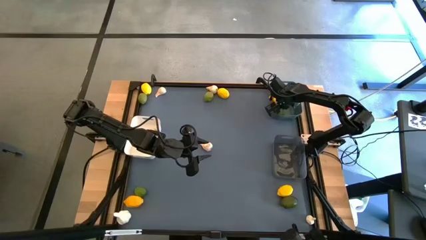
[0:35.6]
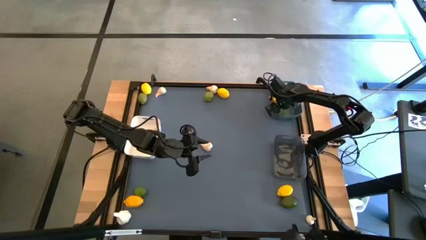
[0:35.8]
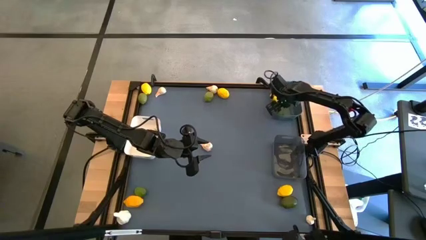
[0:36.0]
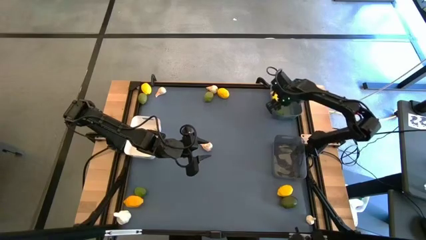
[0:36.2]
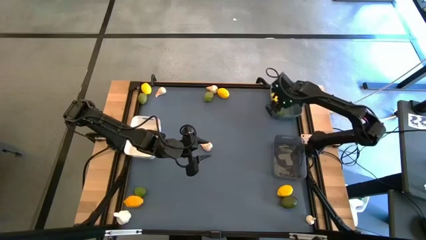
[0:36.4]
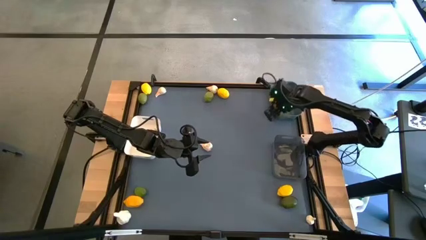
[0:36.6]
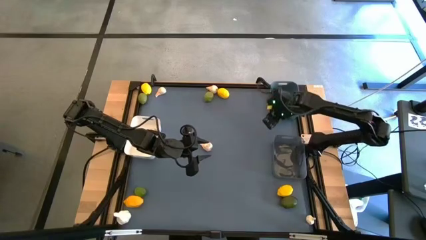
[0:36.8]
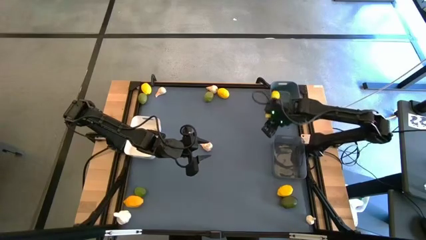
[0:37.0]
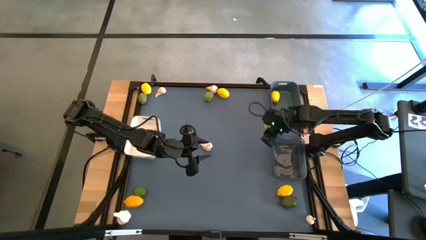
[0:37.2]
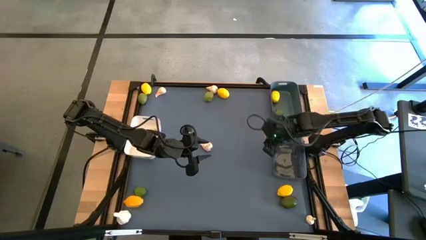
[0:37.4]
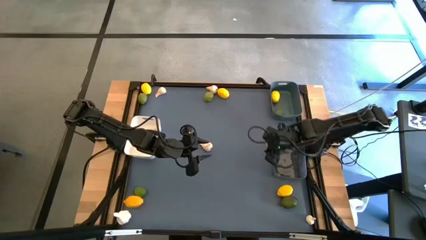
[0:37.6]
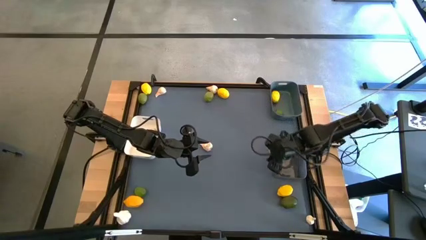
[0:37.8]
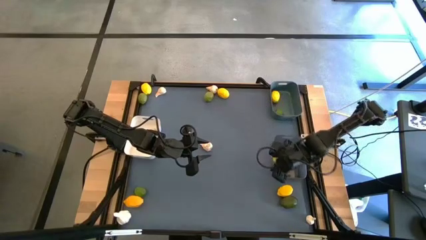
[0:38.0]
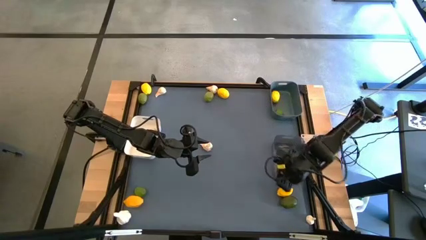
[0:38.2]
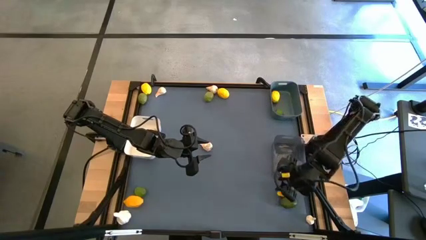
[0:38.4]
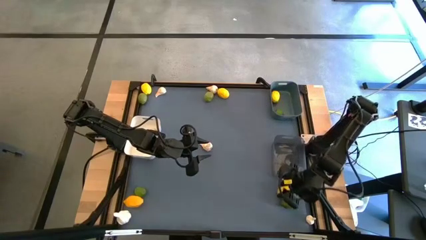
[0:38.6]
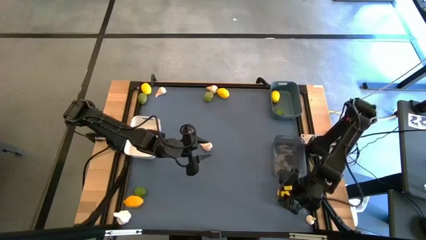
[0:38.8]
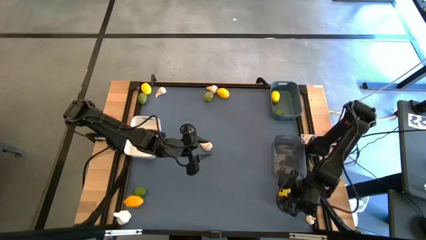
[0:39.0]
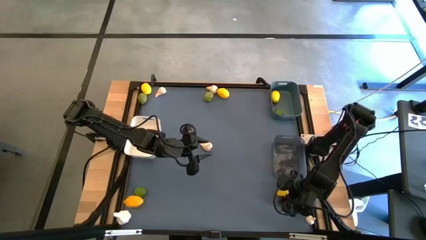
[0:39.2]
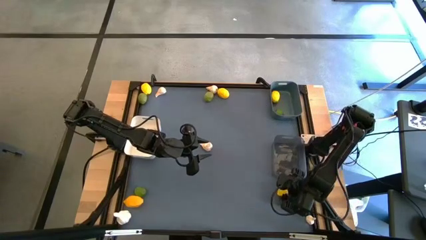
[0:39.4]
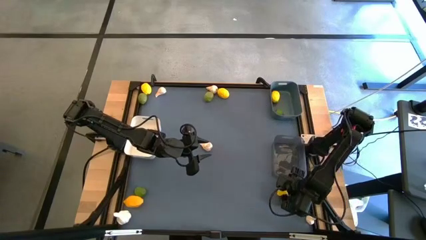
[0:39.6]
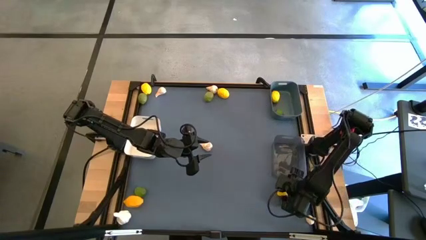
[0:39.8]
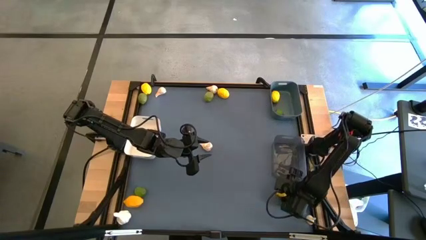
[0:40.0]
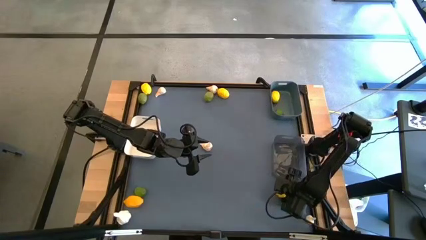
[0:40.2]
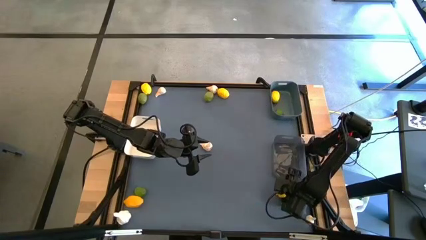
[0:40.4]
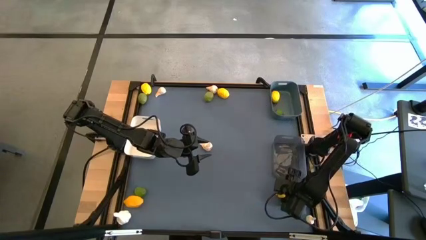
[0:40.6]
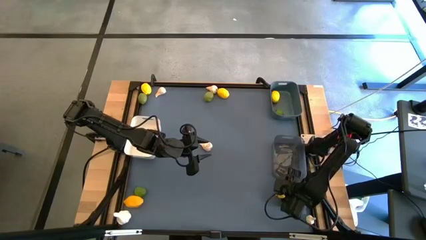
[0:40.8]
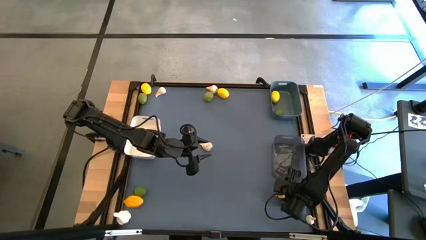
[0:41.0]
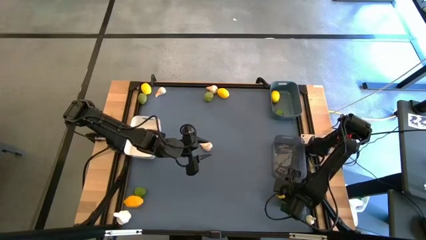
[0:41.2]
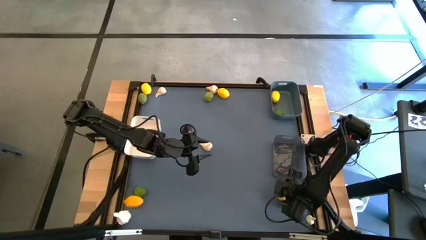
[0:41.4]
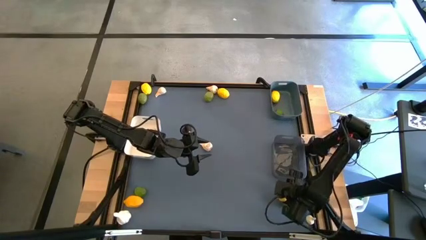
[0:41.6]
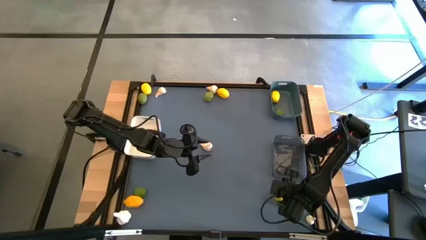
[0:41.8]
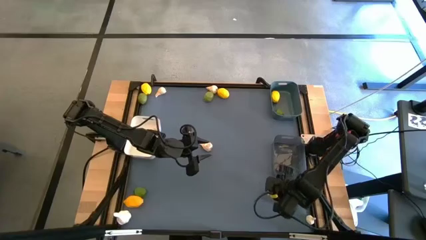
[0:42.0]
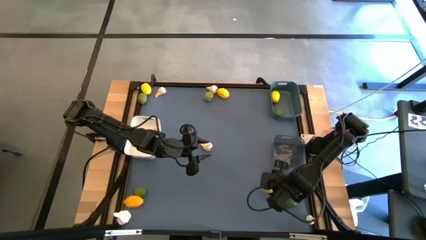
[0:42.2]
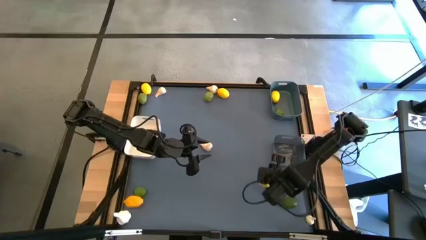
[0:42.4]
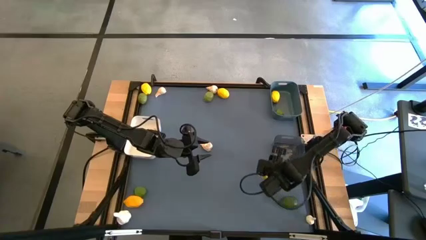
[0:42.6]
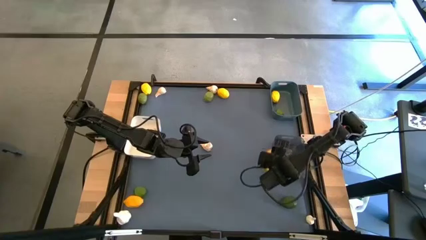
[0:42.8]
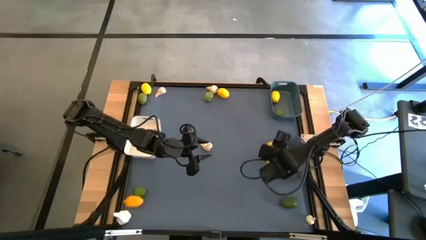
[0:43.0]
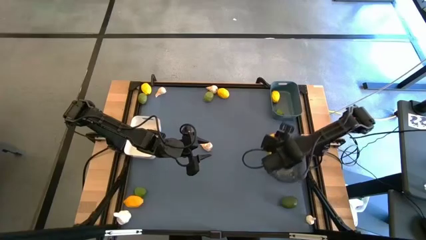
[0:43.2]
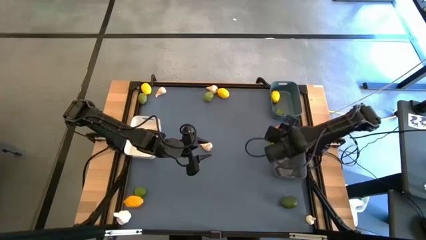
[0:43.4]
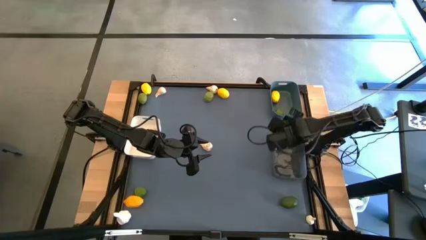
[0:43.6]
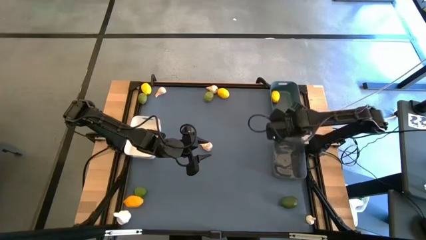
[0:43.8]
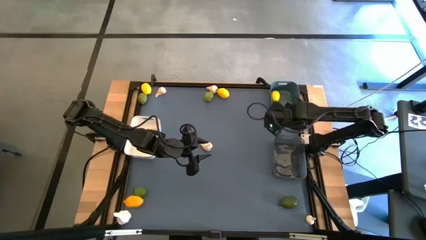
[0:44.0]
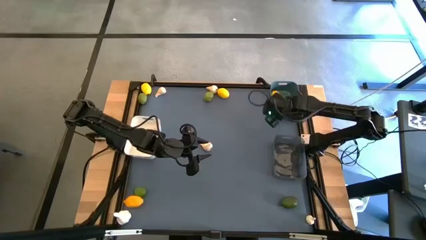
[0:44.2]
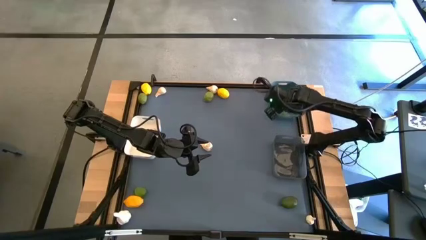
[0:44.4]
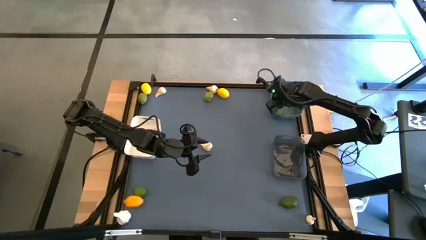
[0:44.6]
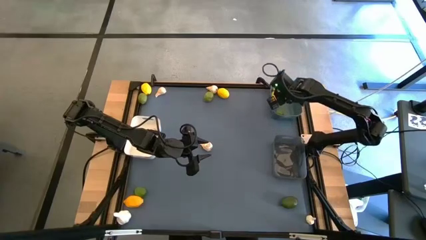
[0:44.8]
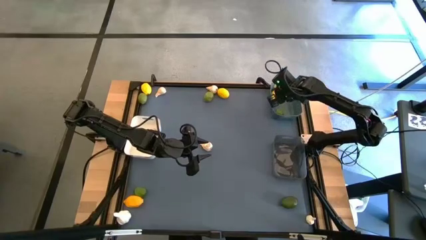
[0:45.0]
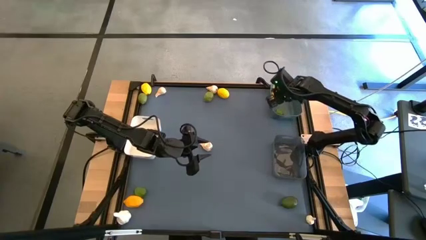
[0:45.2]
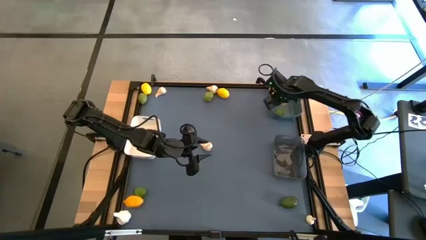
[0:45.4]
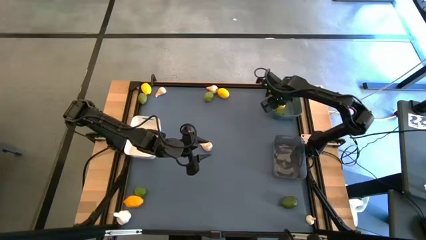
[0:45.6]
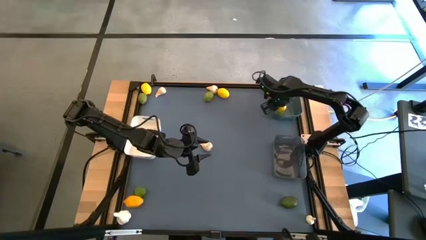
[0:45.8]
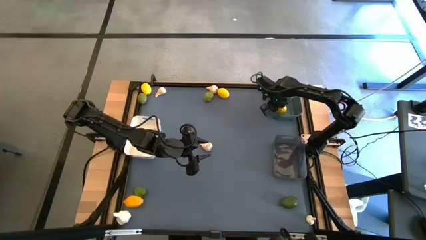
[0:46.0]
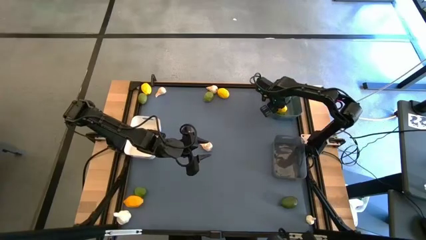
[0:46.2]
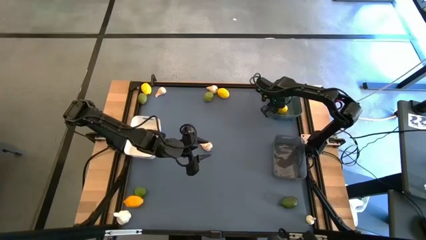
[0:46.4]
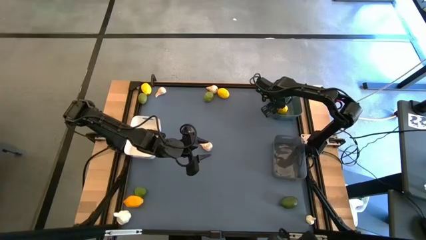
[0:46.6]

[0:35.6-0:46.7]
Task: Sort produce into baskets
Put the lemon into the blue bin

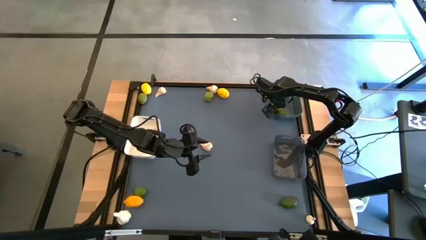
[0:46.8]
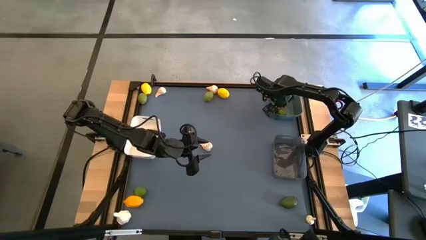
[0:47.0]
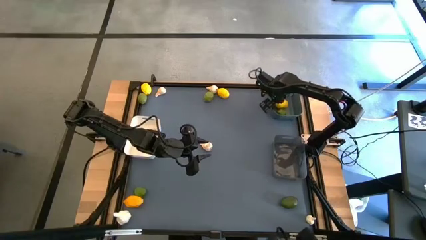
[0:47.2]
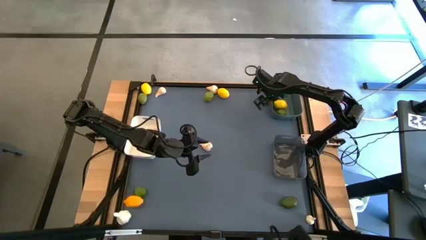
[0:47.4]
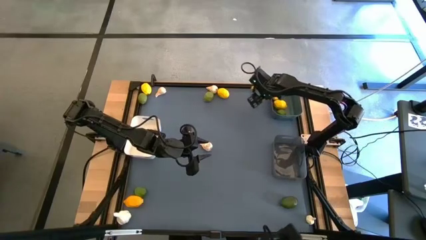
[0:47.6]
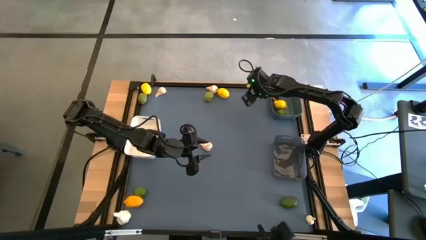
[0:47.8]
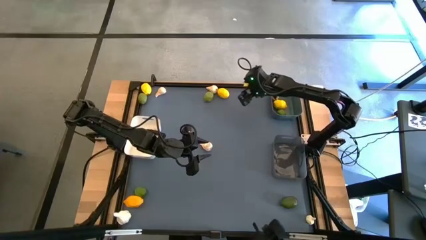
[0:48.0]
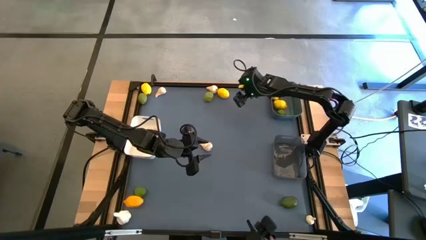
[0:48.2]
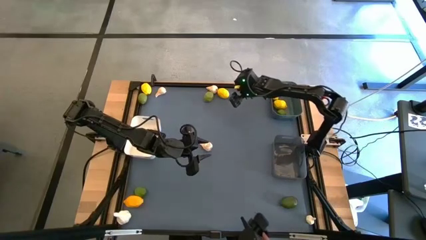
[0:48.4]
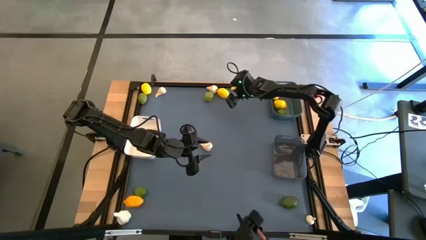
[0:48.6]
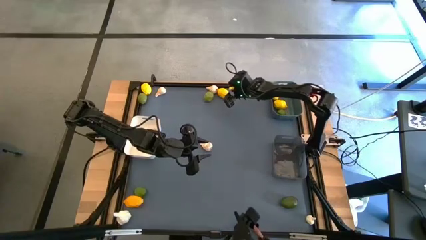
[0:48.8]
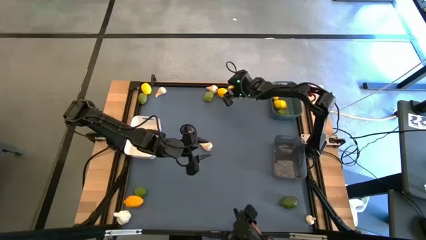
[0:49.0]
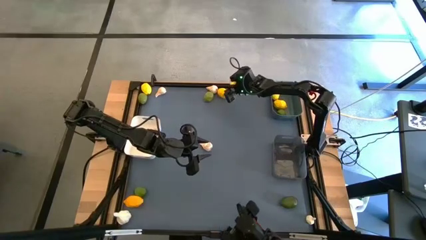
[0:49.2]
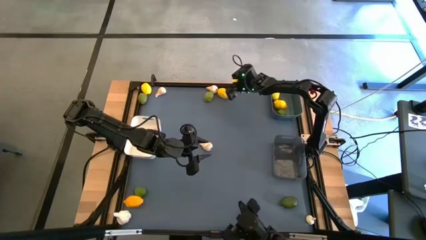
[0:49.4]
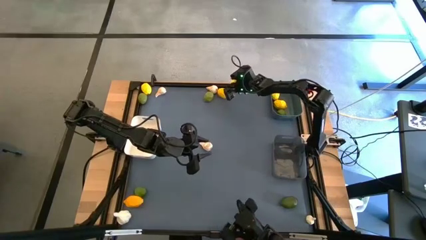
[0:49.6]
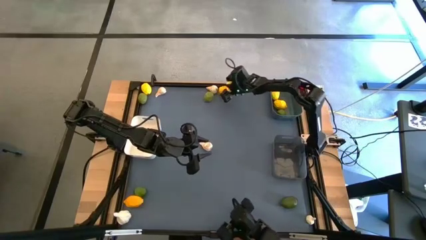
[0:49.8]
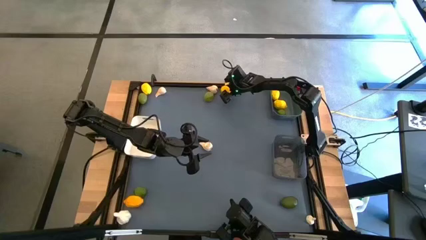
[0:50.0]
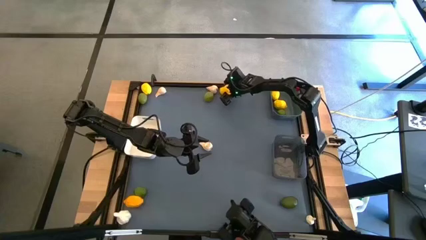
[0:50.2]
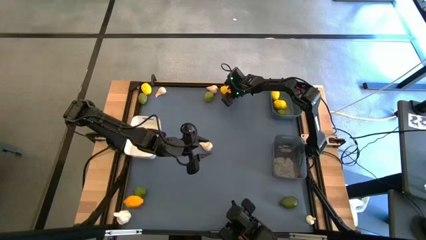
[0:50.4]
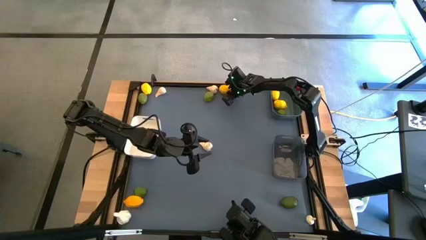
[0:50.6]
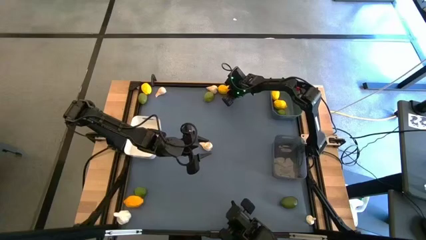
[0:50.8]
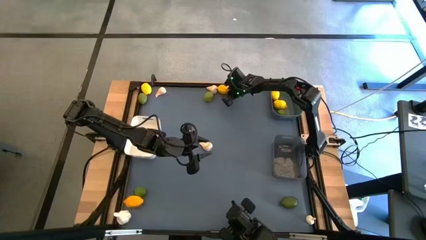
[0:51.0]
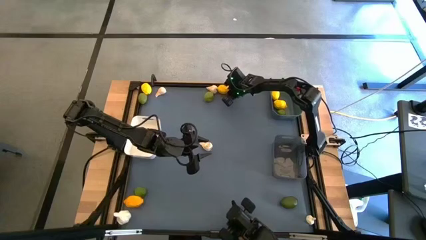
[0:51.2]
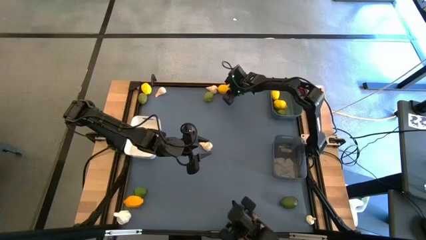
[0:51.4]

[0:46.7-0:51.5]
Put the lemon into the blue bin

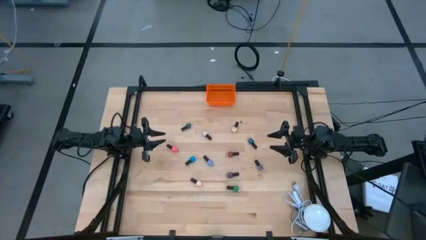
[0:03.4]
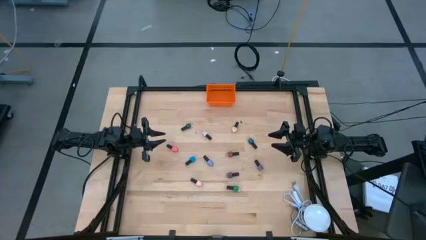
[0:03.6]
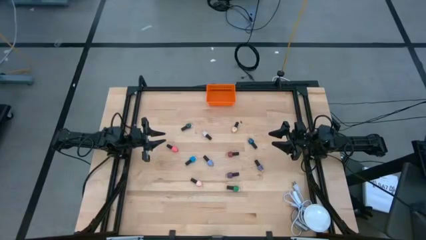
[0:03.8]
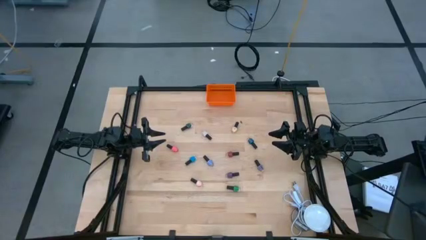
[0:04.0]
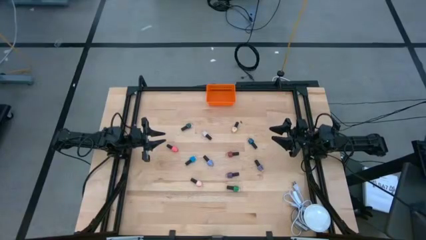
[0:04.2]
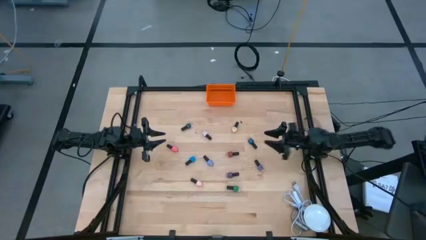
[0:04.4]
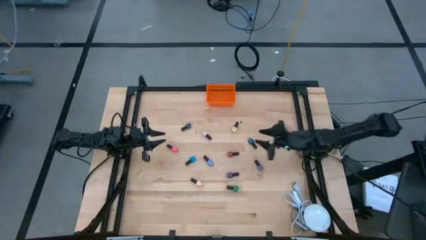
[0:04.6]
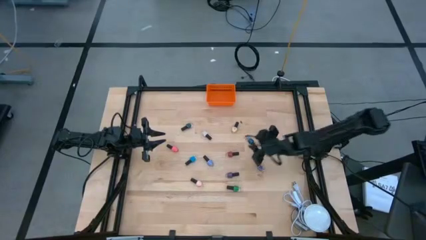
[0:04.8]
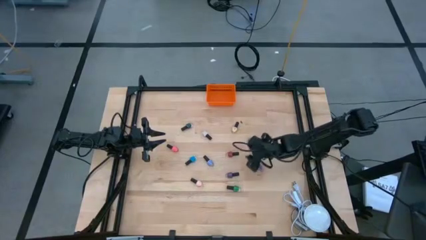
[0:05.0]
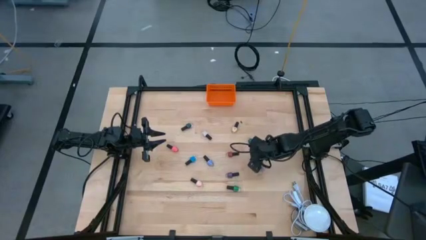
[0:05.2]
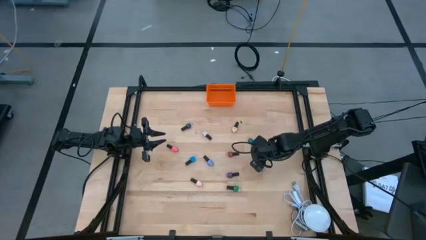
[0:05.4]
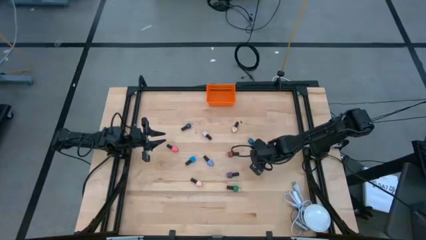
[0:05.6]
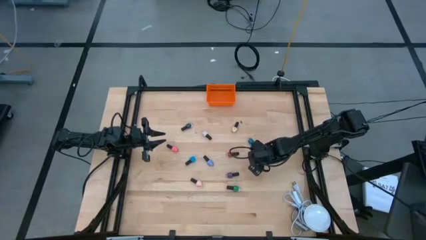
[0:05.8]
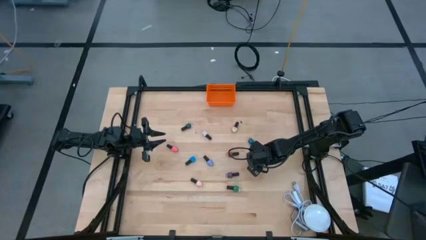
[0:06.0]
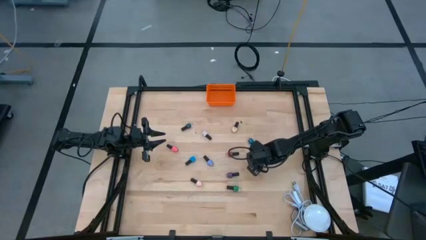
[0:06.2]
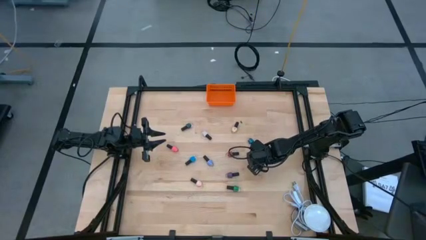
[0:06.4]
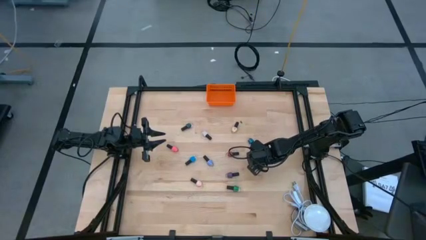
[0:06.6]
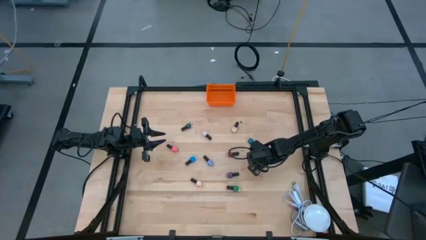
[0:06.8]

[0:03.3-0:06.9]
Task: Pick & Place Nail Polish
Put the violet nail polish bottle into the basket
